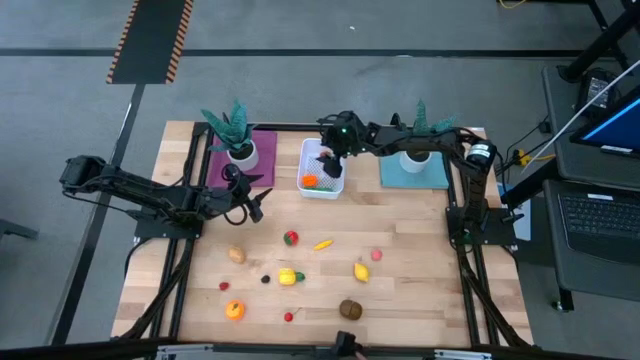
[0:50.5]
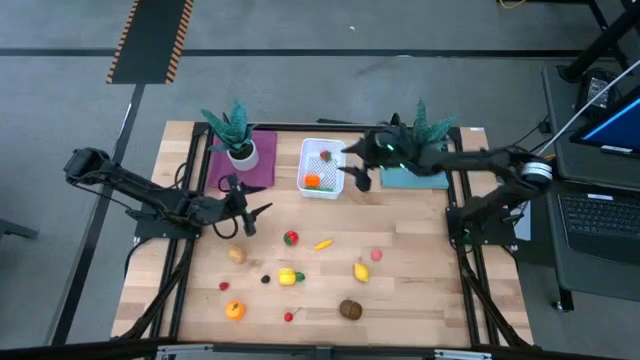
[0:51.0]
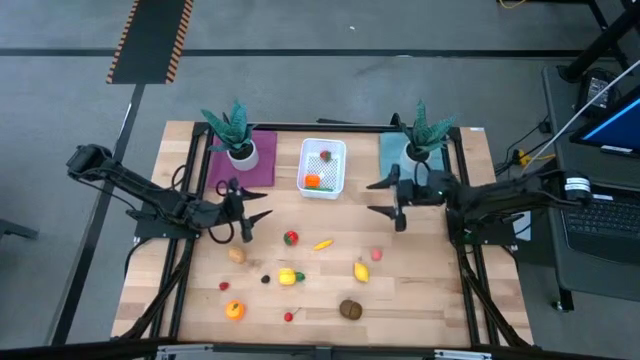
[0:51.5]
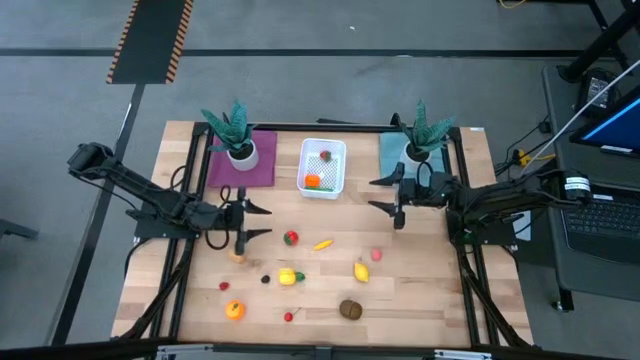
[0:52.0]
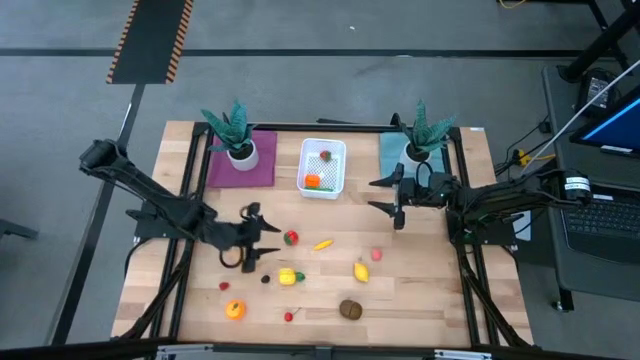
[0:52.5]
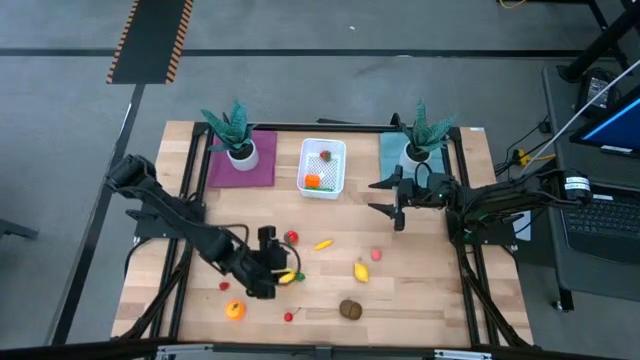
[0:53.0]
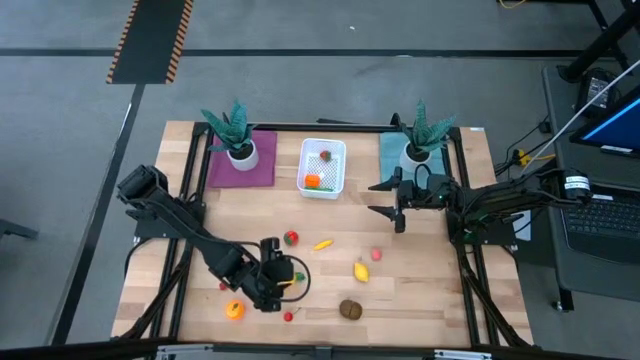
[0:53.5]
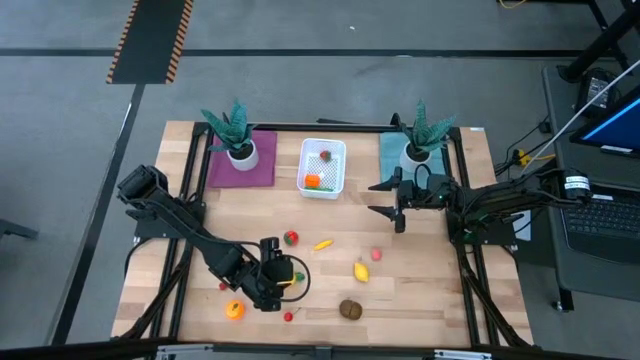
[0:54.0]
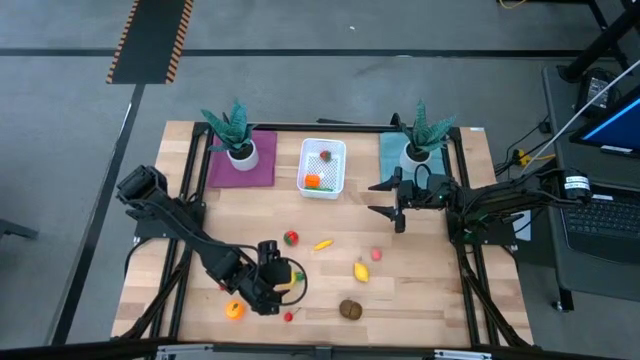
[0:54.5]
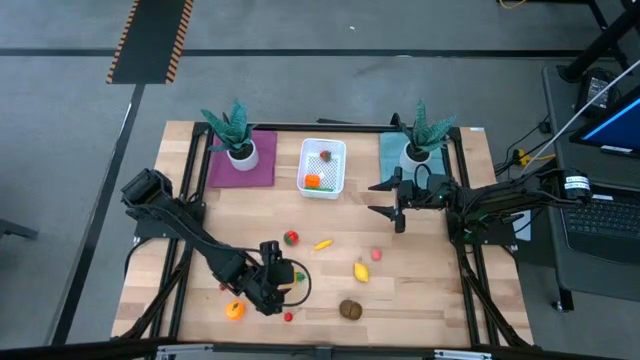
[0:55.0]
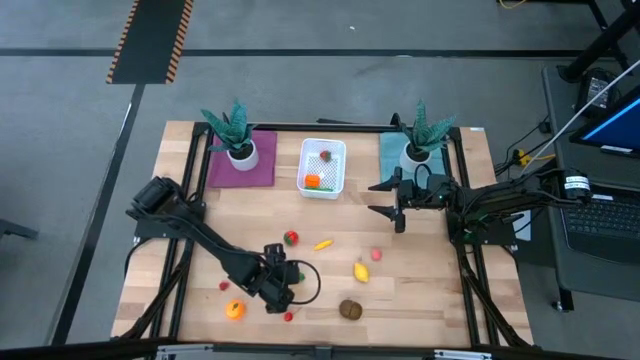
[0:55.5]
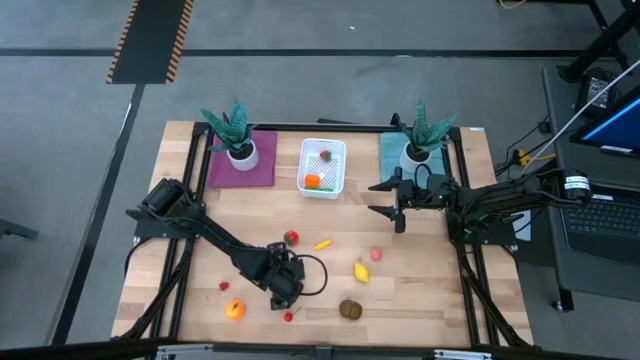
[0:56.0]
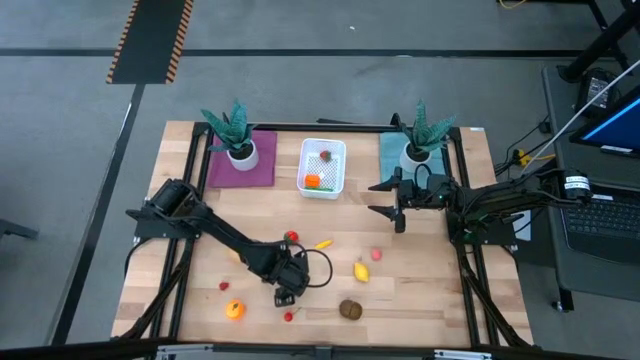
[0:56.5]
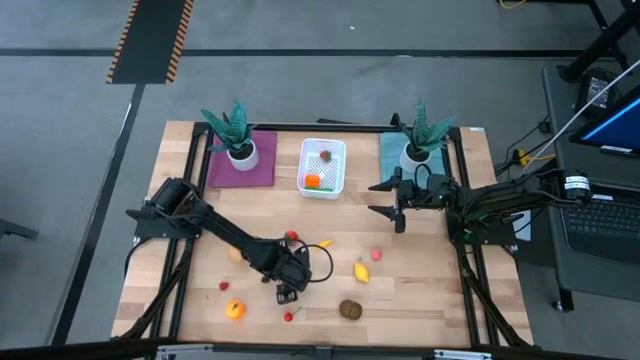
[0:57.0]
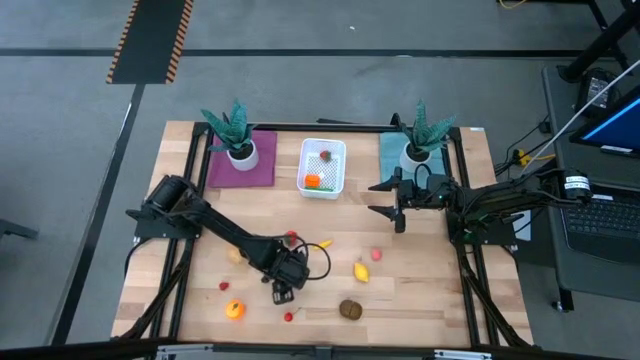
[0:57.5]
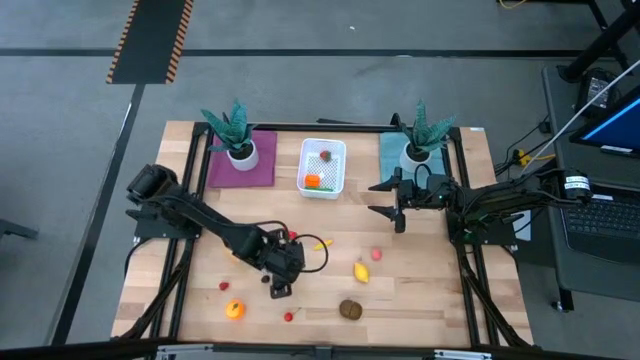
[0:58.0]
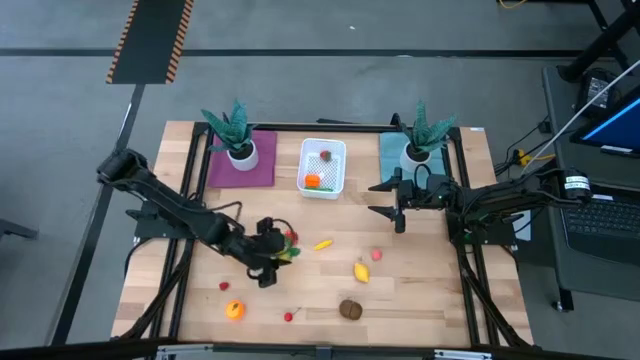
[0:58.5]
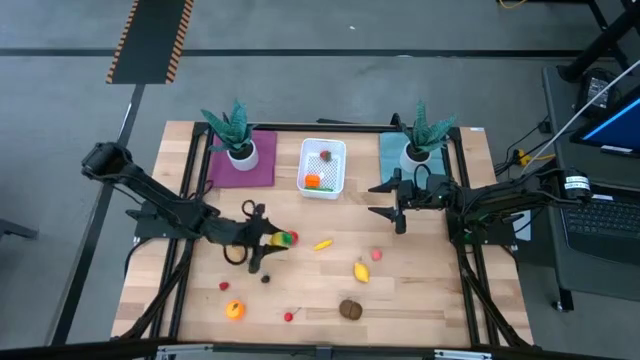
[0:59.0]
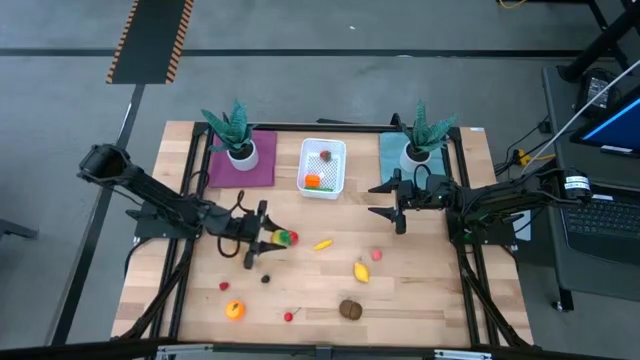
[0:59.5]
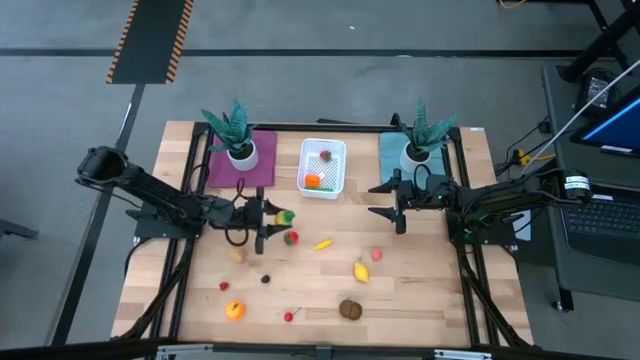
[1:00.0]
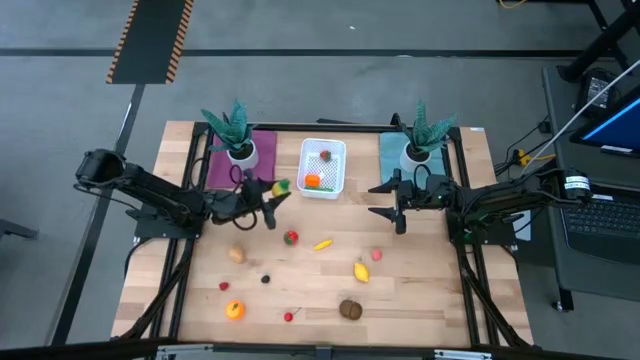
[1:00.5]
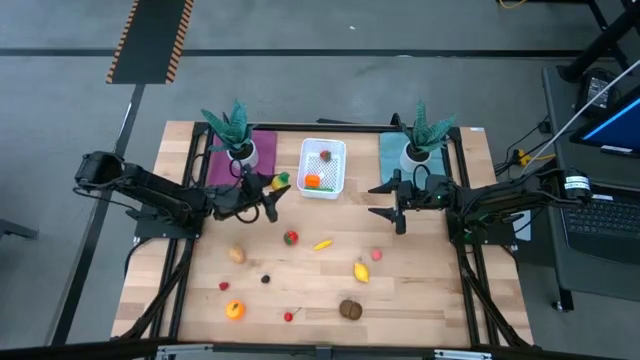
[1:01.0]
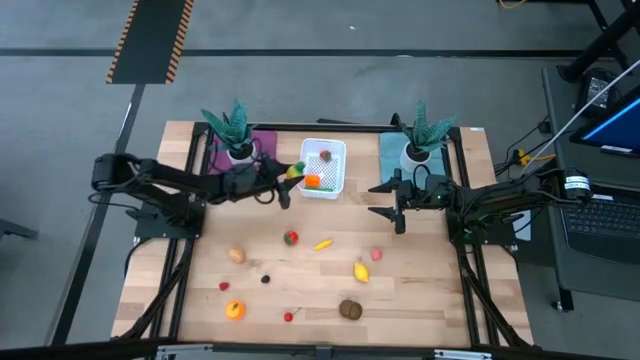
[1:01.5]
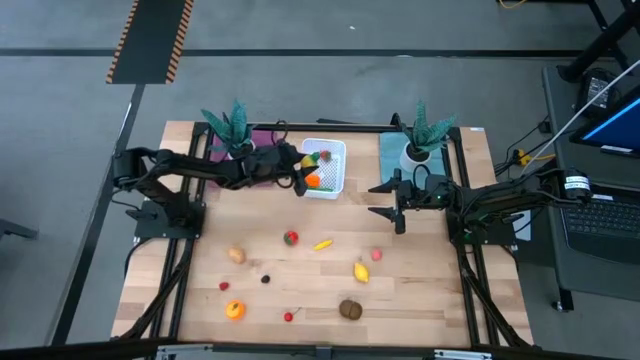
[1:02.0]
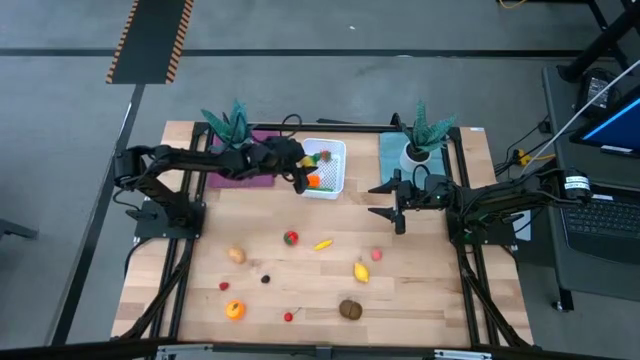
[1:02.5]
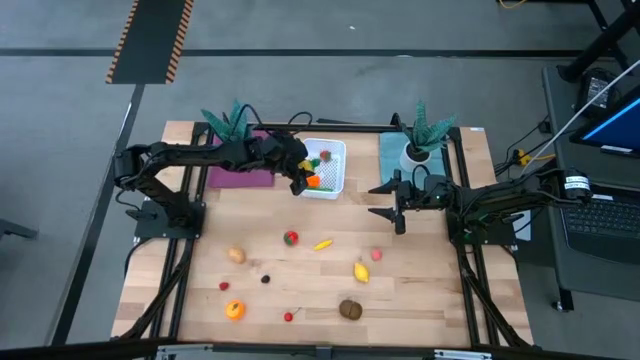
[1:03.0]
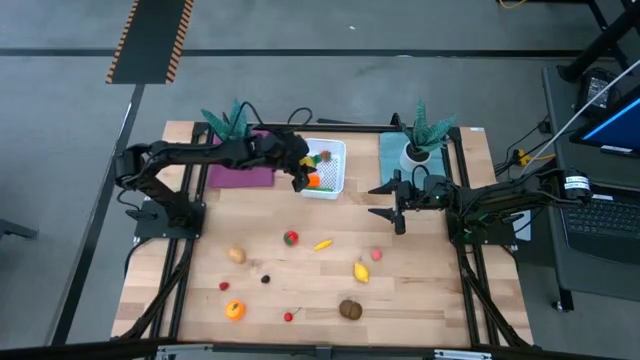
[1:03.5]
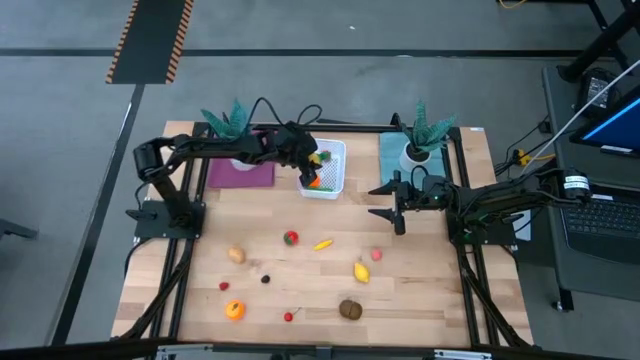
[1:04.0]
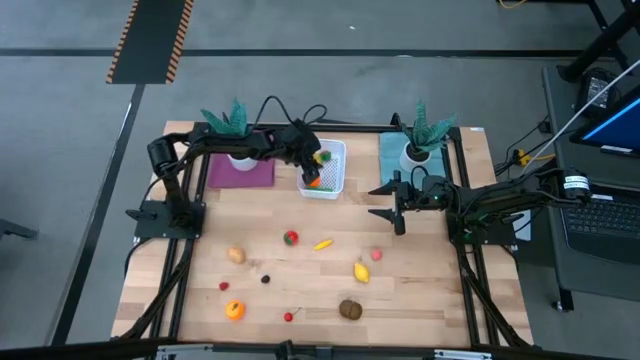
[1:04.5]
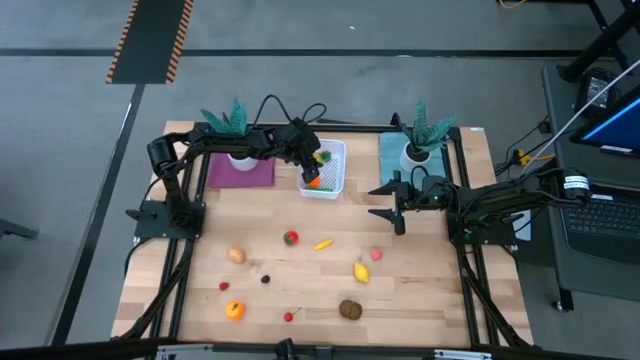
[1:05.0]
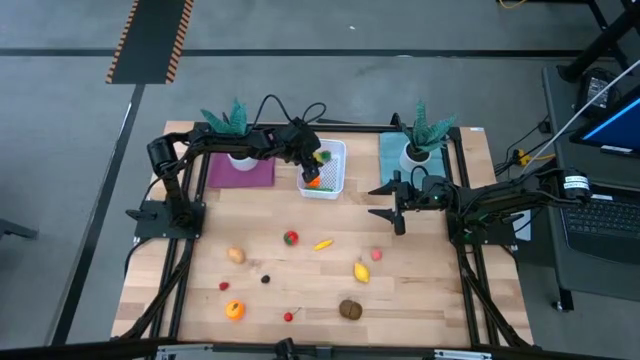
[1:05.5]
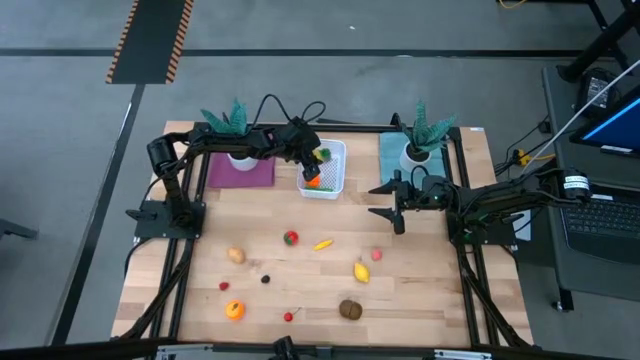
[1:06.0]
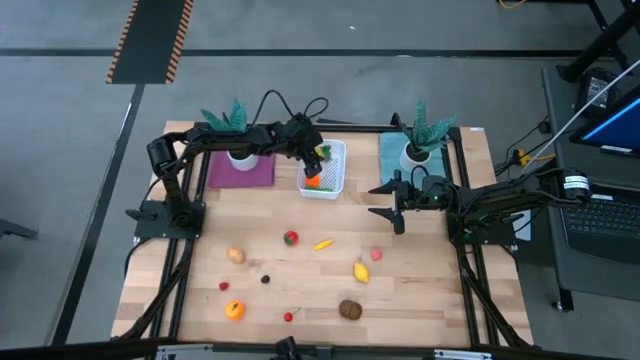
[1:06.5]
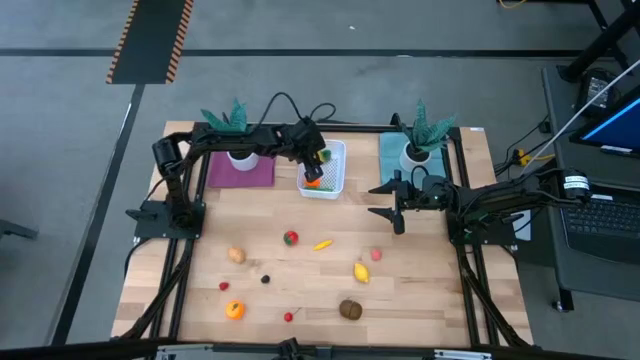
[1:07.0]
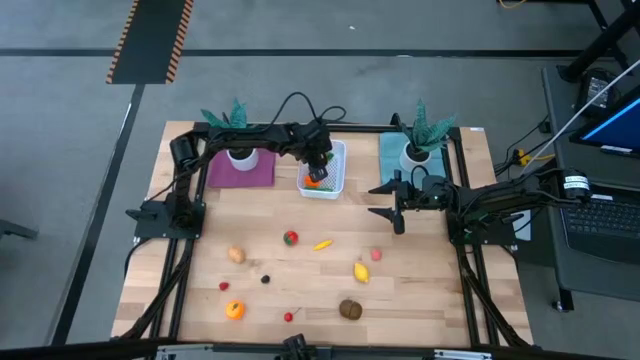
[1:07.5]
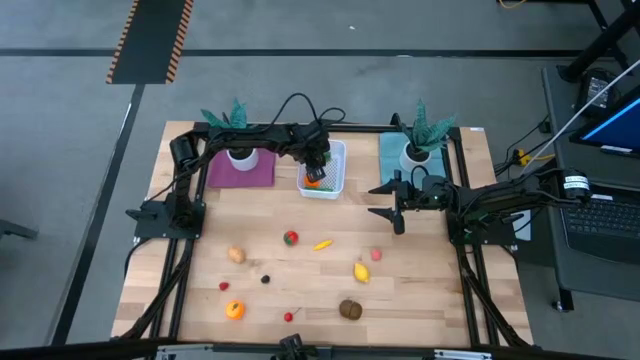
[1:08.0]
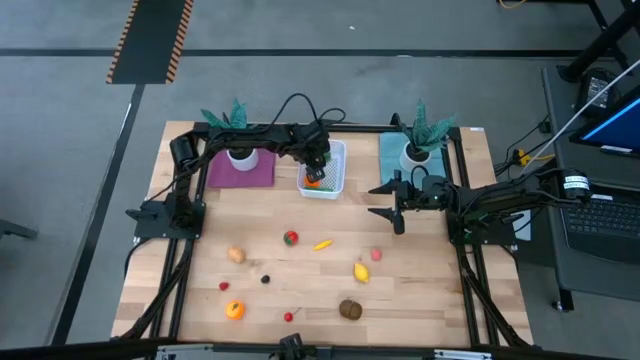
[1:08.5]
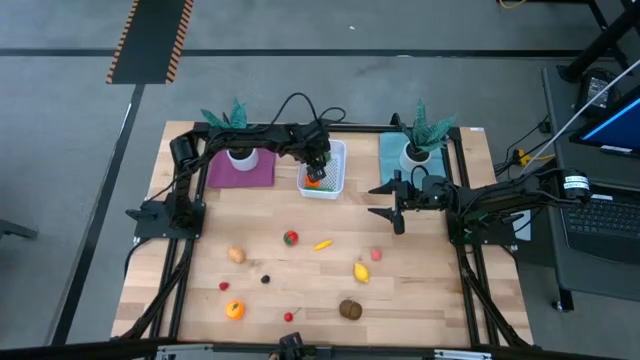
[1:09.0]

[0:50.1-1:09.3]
Task: Pick and placing Produce into tupperware
Put the yellow pineapple into the white bin

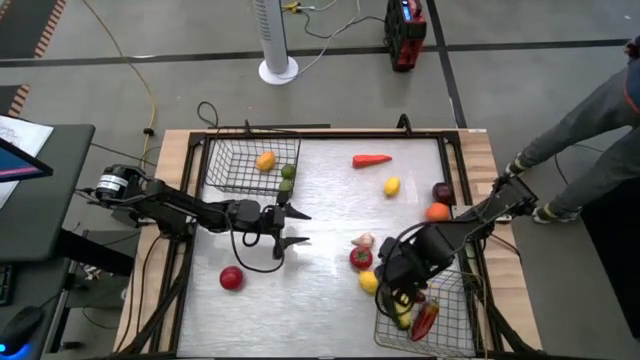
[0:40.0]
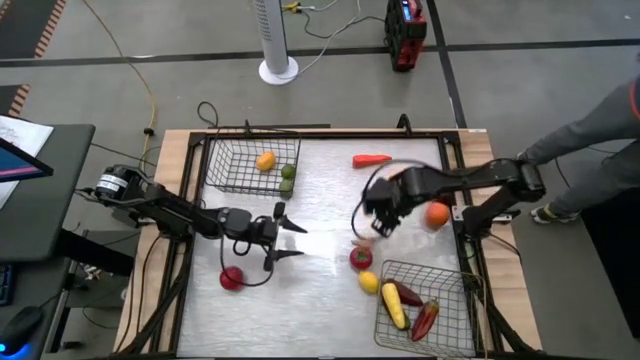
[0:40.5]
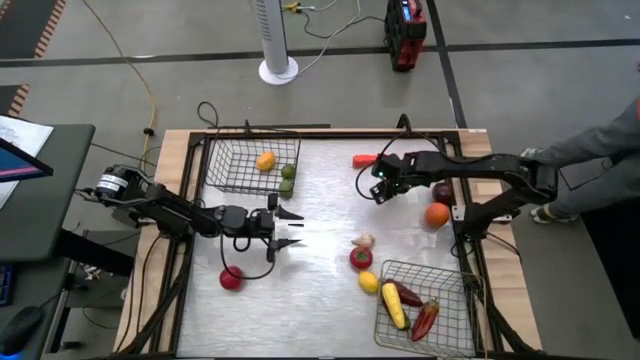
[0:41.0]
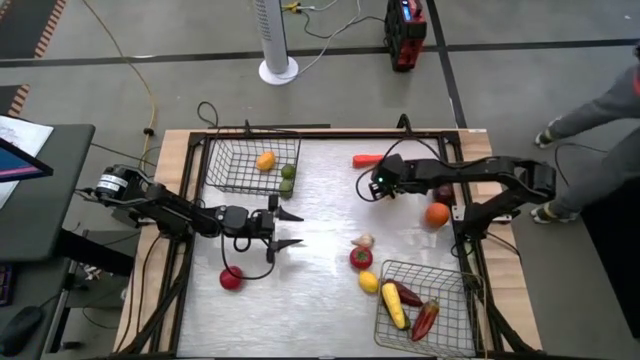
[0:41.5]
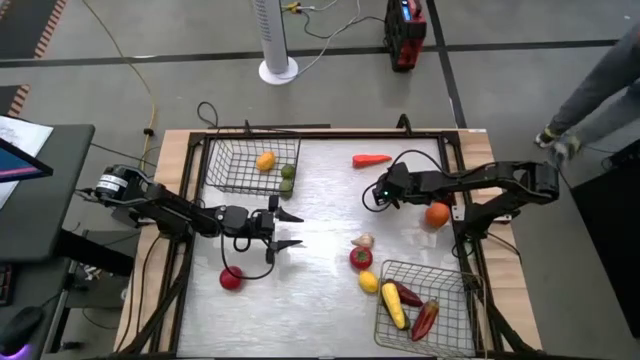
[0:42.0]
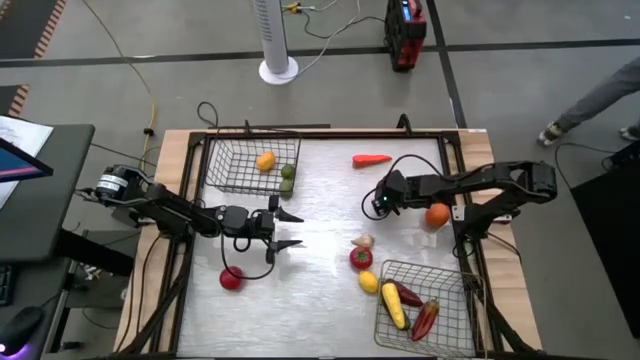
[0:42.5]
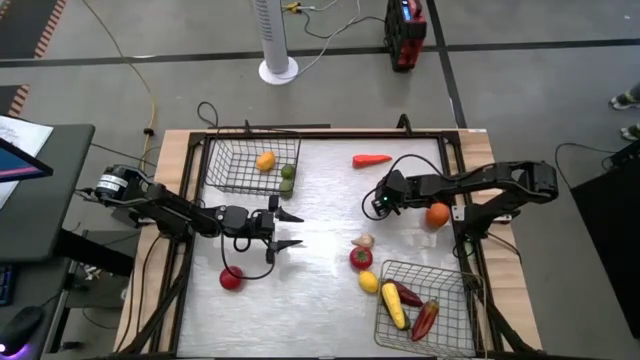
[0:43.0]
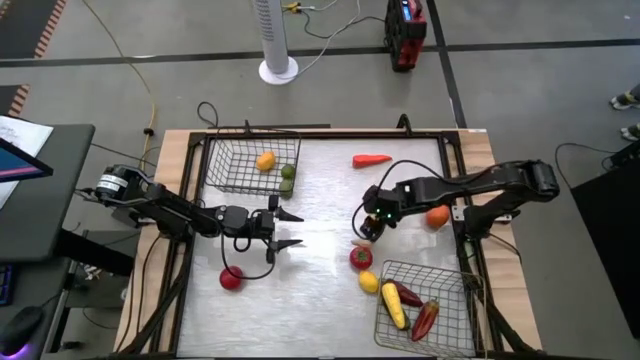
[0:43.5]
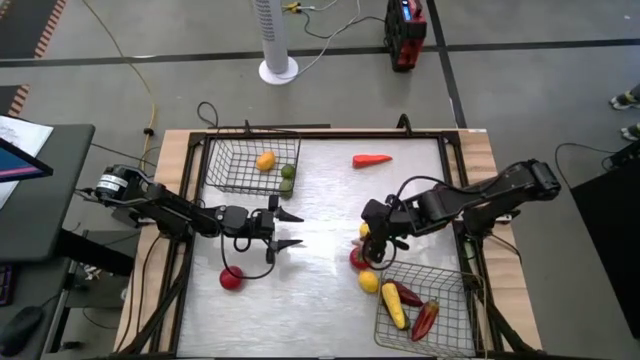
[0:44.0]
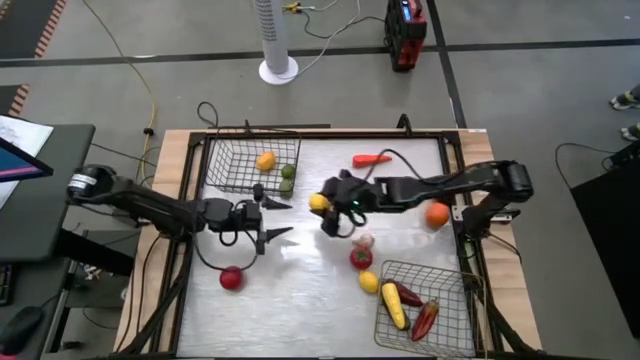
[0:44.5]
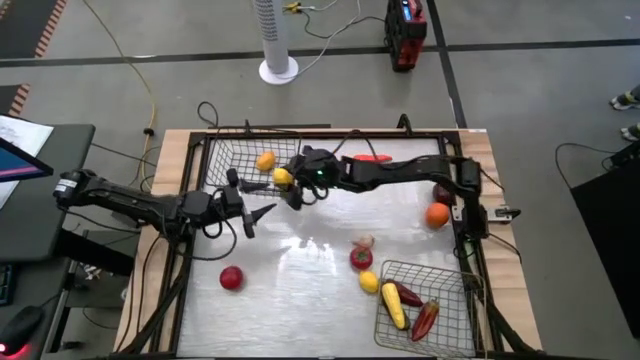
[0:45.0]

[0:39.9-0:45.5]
Task: Sort produce into baskets
Put the top lemon into the black wire basket
